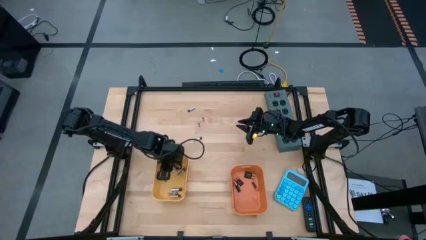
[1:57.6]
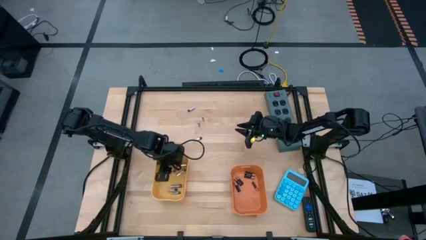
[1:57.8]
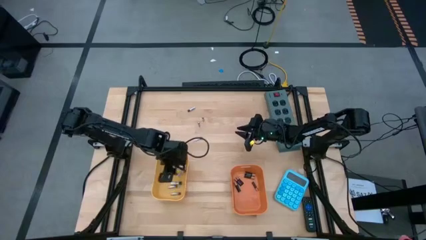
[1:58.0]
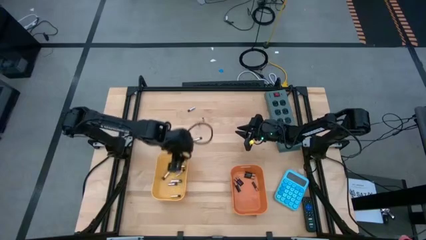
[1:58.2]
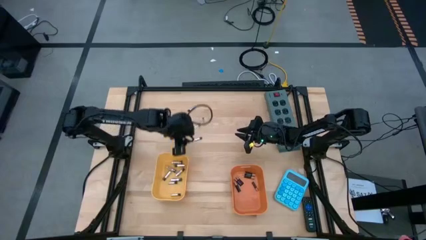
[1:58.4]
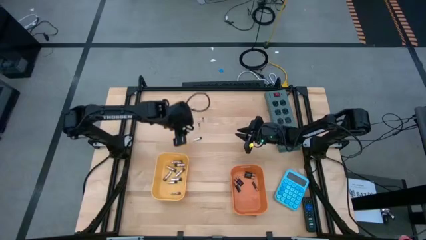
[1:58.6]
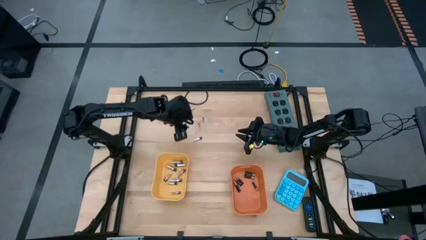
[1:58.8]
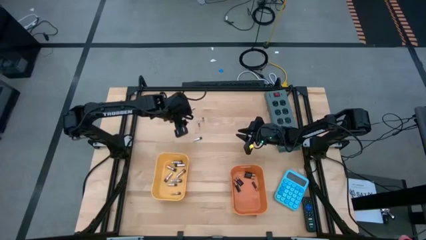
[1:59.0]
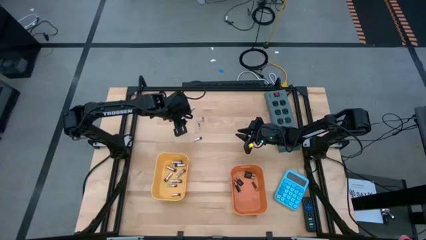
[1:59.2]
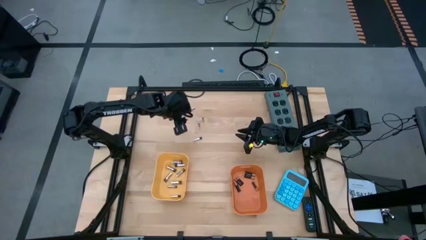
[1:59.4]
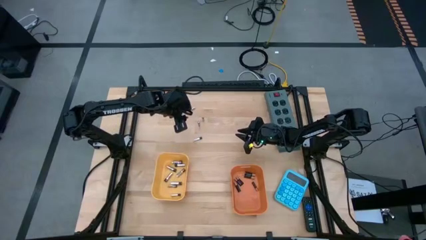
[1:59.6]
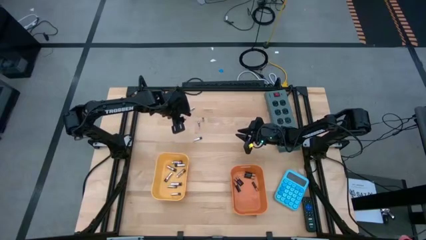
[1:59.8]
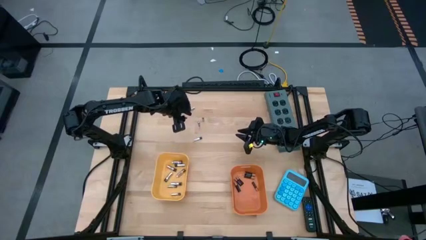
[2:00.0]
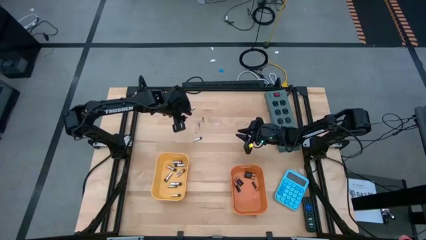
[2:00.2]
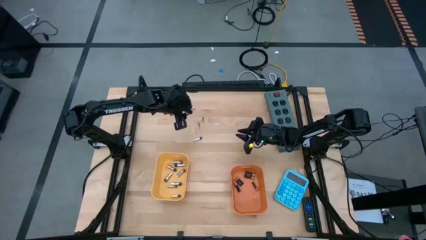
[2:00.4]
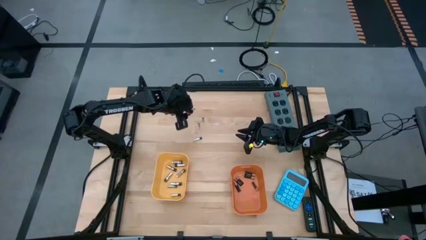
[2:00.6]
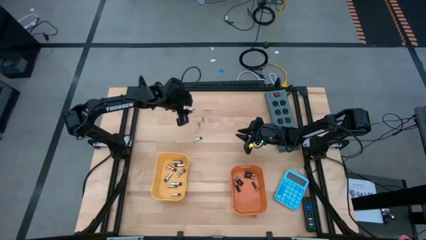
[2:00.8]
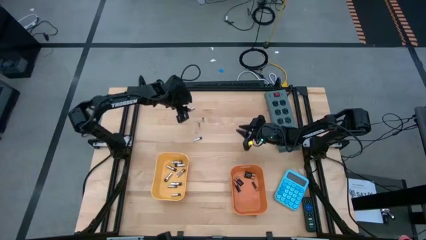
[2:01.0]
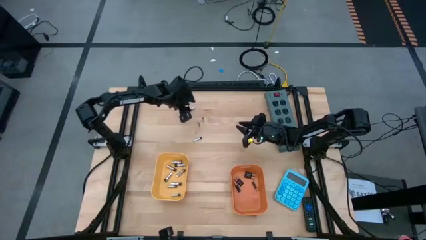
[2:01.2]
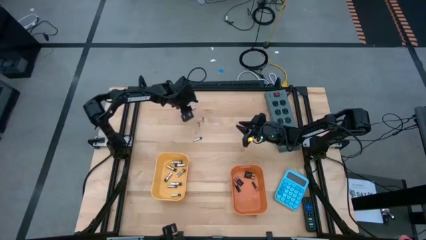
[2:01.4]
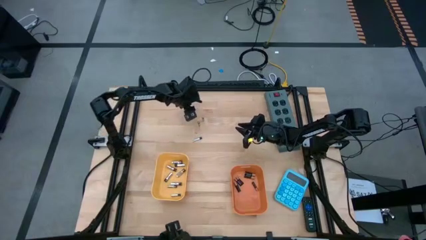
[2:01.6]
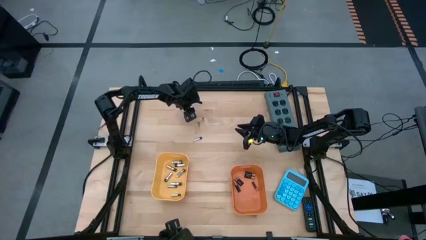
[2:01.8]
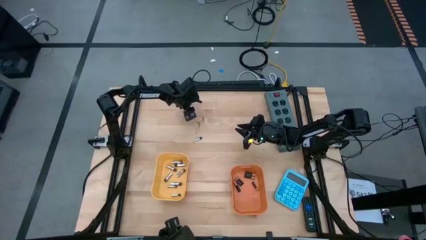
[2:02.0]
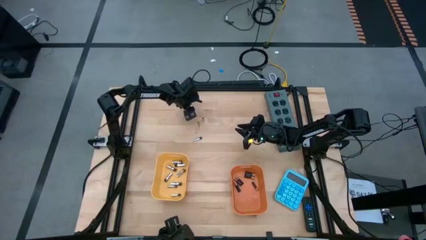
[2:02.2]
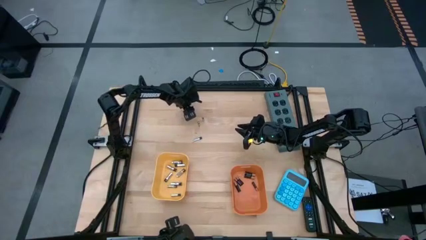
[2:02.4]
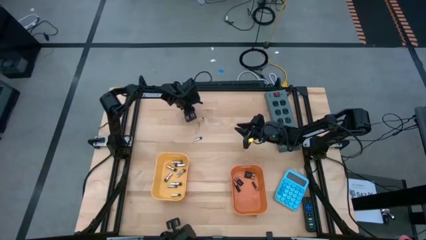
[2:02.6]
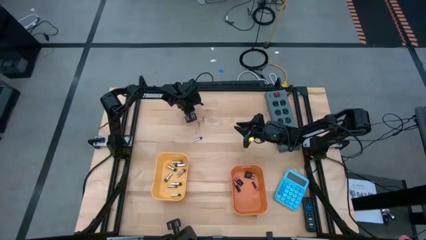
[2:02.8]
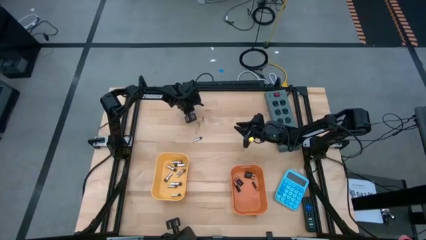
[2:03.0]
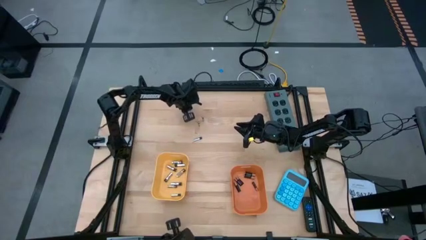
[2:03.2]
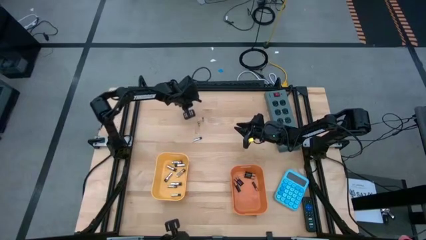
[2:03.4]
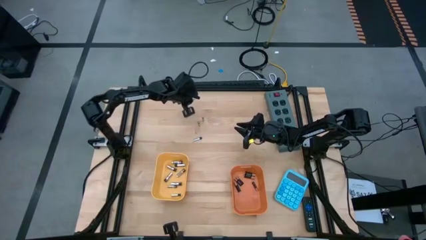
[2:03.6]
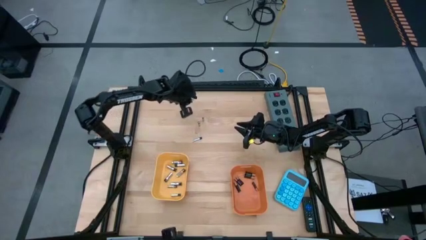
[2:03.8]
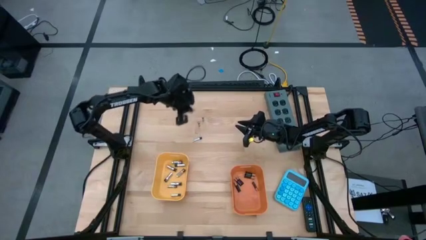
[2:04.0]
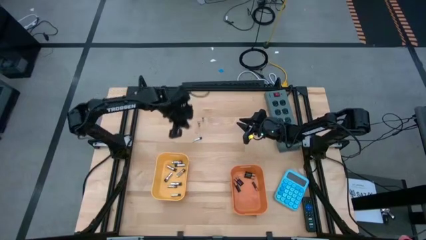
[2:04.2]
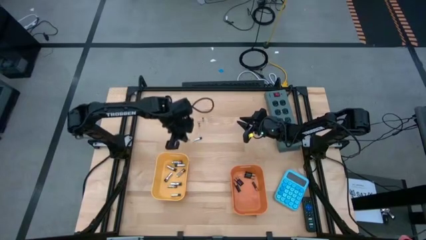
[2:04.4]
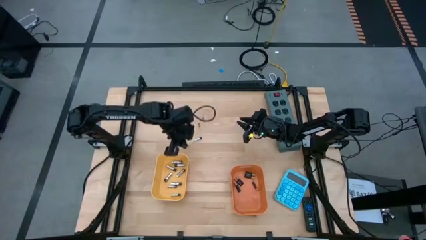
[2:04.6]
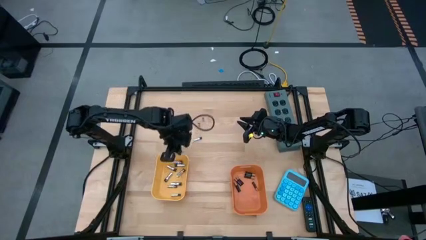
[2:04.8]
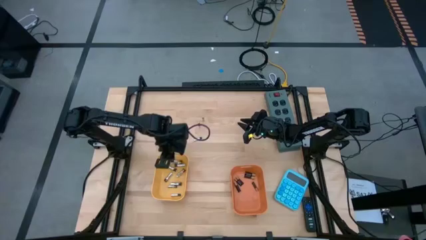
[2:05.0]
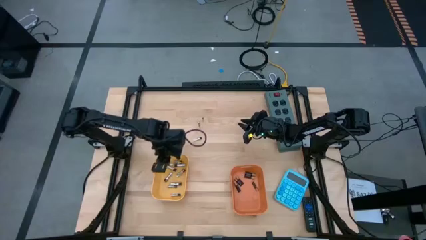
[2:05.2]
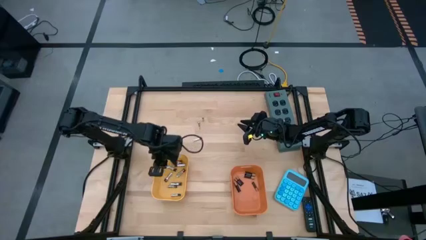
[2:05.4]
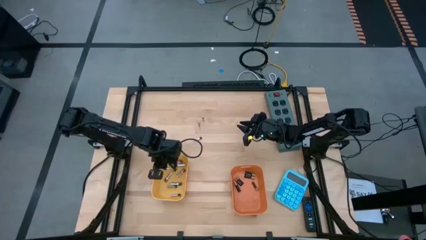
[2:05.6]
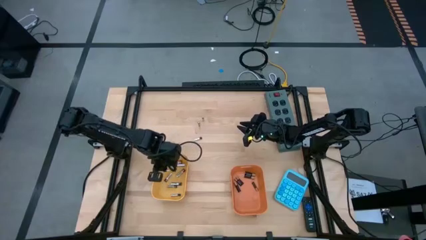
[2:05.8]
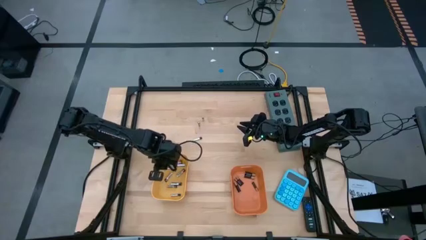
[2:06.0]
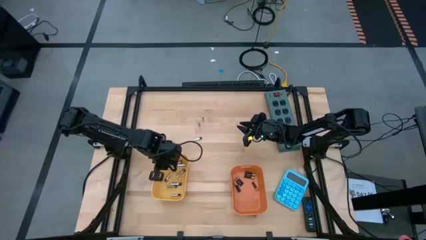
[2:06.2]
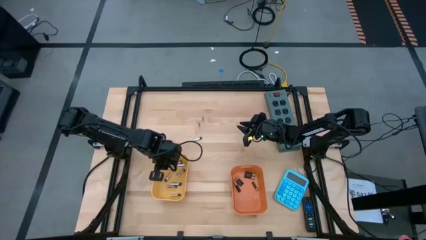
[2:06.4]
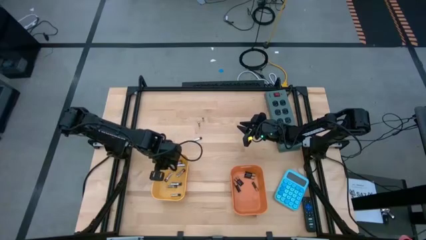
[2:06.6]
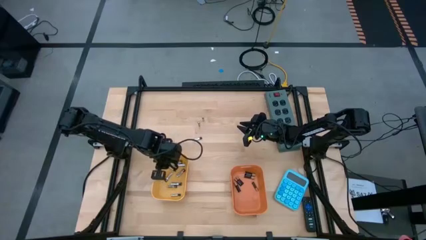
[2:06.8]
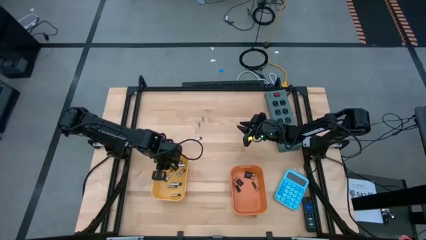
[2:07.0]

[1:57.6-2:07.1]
Task: Sort batteries
Put the silver battery into the yellow bin

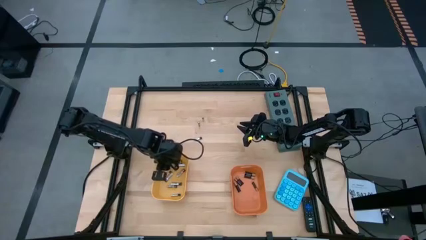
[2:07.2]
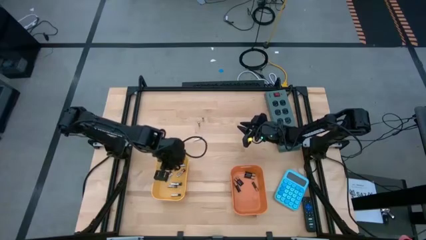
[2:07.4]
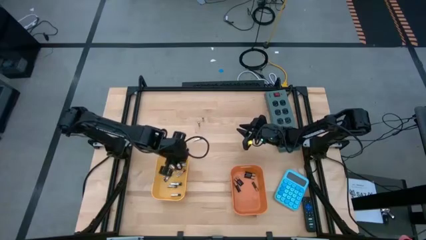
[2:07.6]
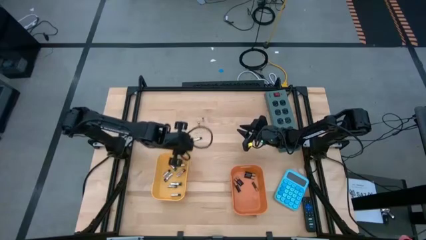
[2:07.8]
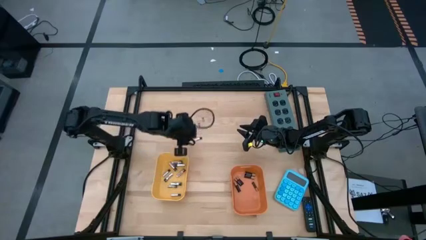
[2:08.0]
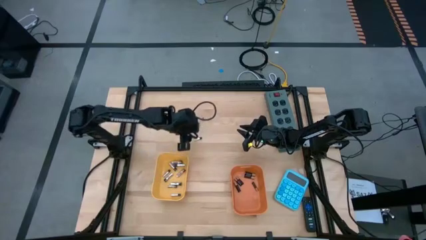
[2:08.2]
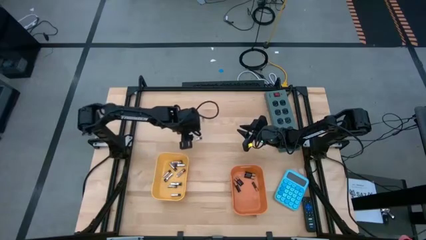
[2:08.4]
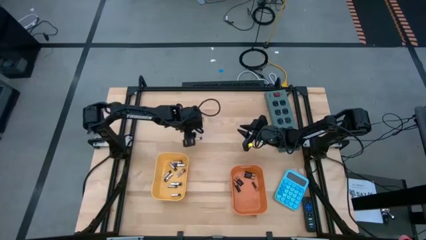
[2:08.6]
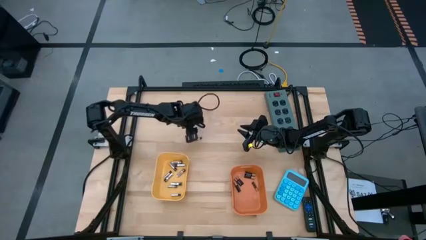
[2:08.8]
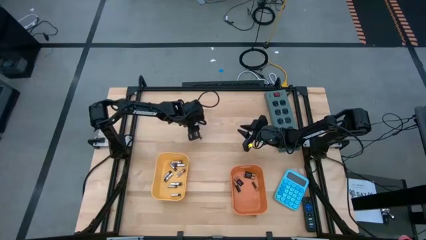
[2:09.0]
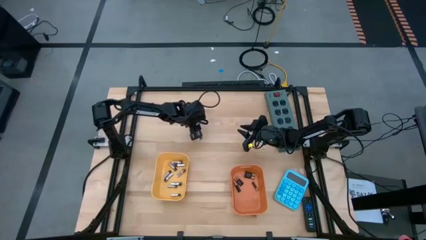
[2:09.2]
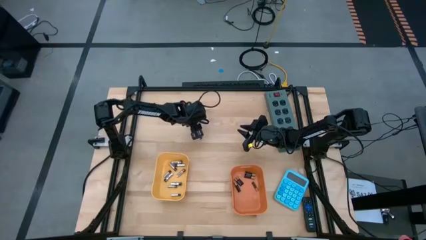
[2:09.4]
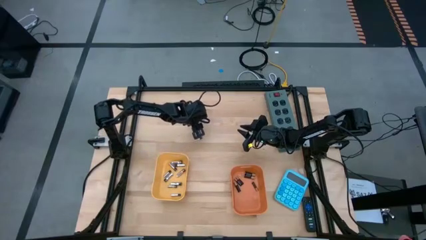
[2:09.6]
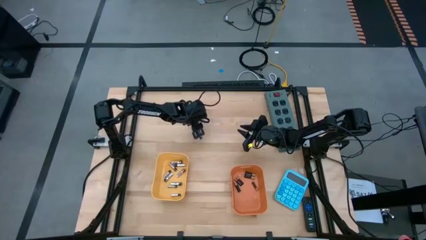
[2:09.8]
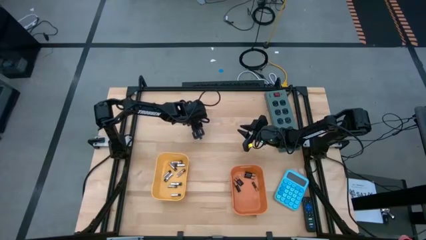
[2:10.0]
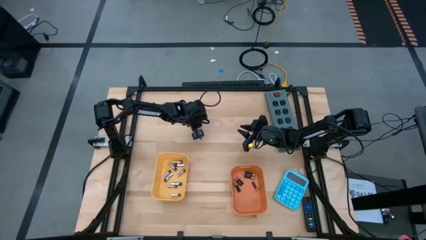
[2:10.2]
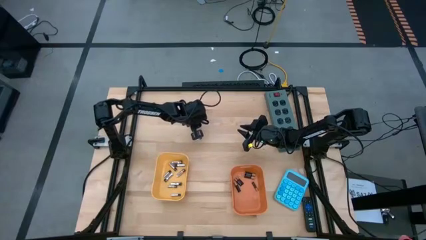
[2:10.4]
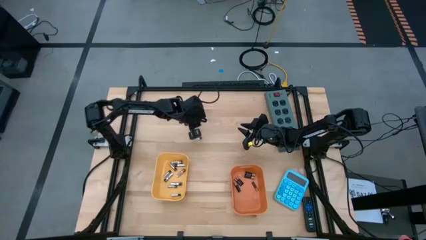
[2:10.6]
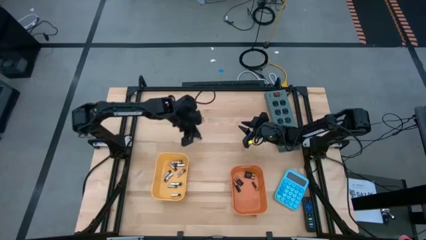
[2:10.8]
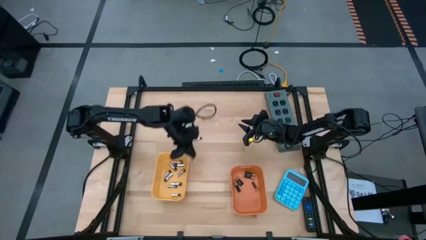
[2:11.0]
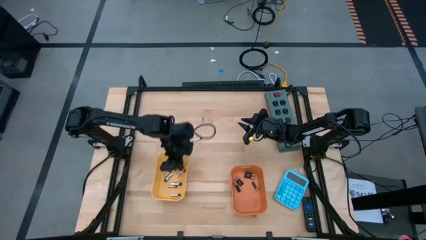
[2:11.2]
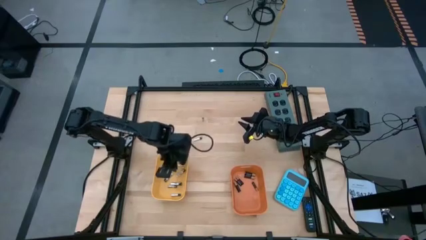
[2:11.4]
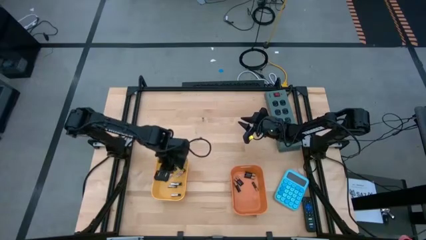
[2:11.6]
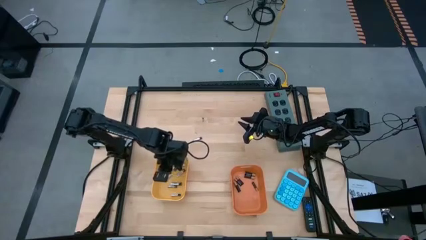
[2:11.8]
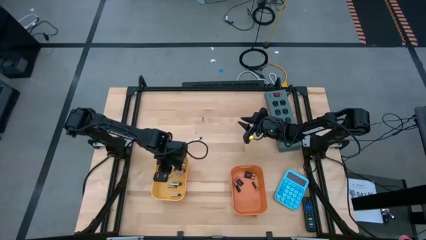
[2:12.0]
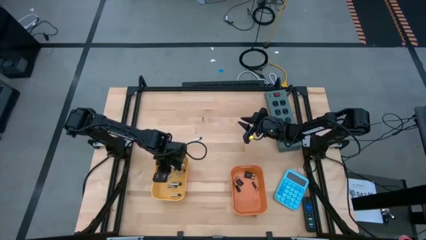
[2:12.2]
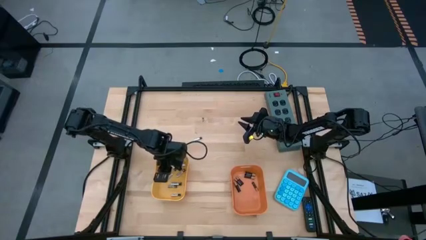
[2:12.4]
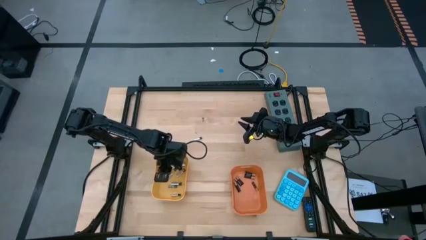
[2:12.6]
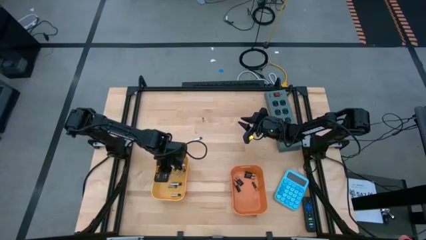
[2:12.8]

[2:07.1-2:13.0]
Put the silver battery into the yellow bin

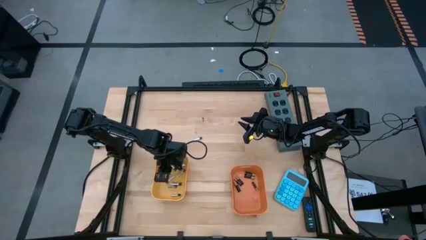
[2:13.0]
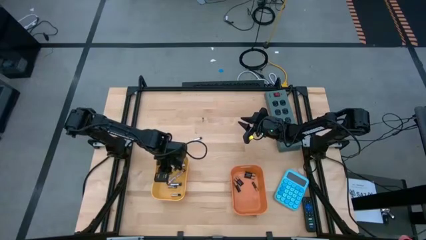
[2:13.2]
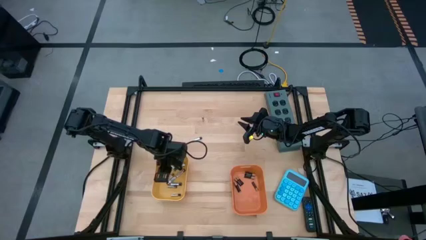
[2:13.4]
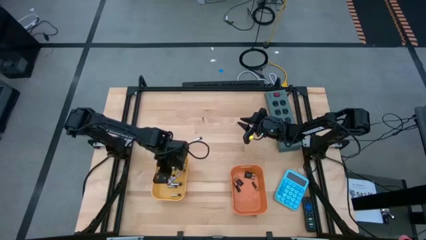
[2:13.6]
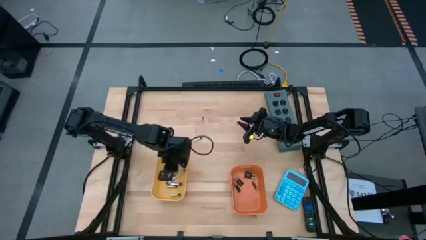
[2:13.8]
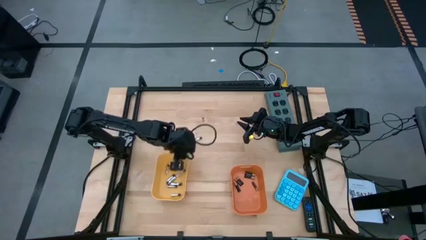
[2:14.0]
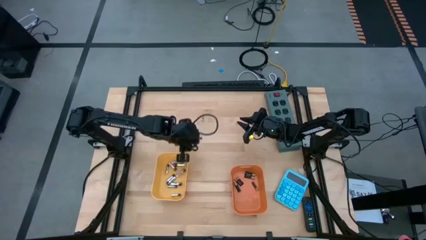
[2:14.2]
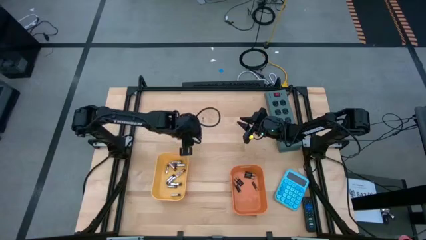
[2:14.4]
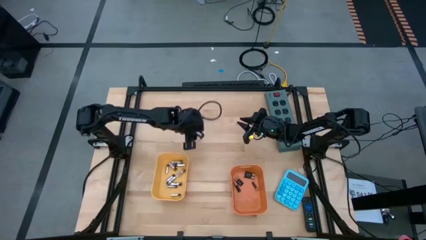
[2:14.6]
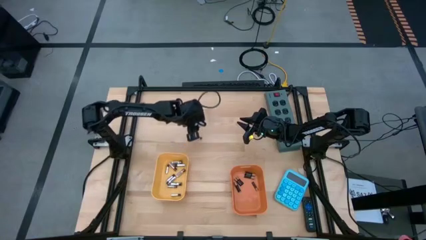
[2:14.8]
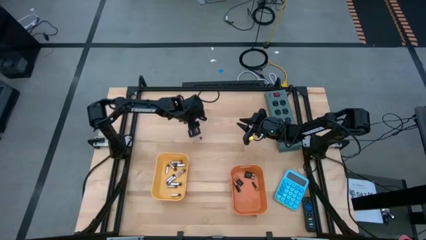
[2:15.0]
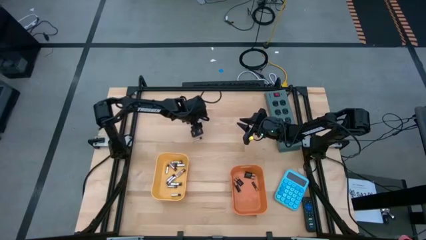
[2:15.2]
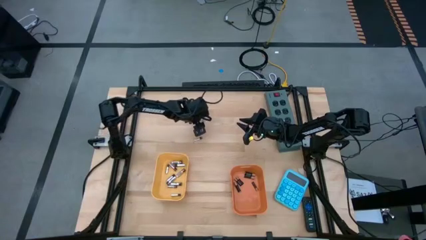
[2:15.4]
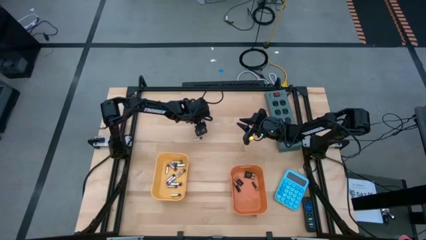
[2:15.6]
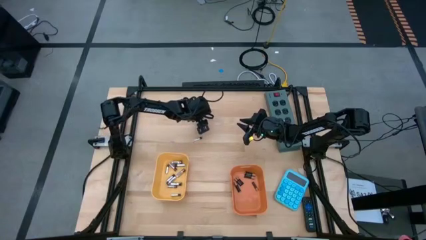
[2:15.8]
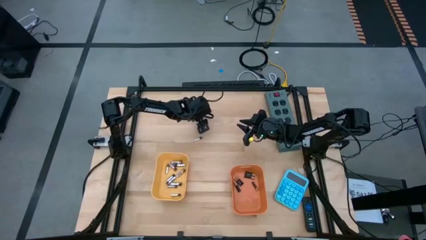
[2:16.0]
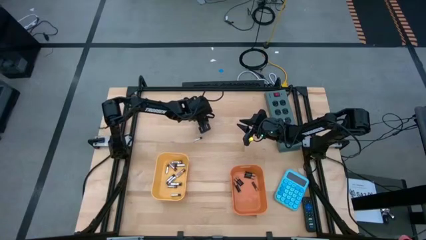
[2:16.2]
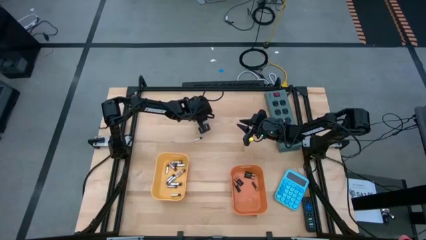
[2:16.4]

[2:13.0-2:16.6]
Put the silver battery into the yellow bin
